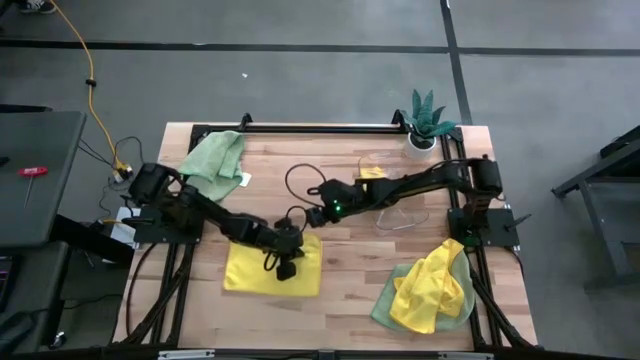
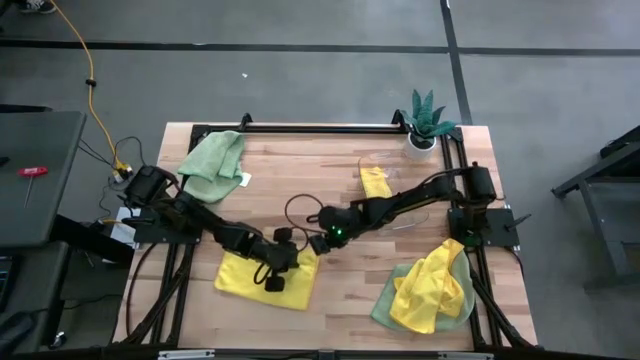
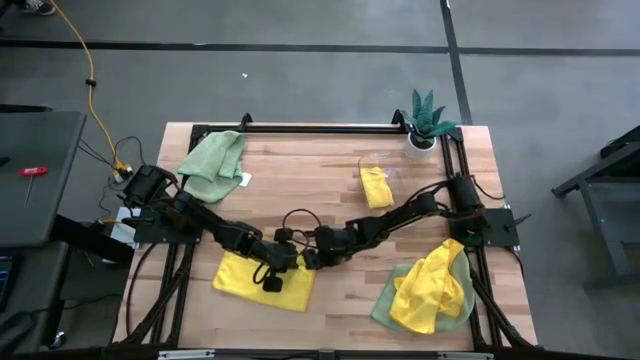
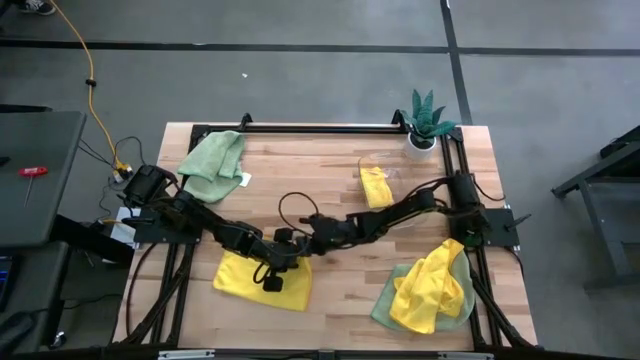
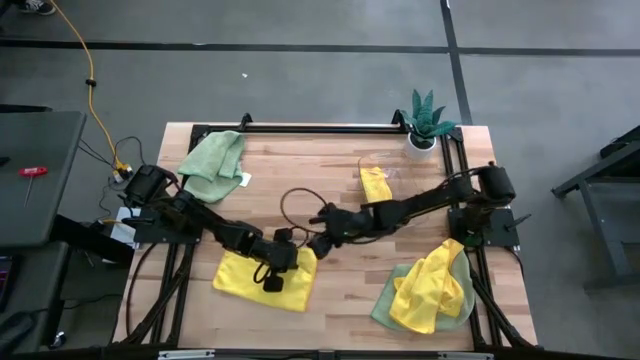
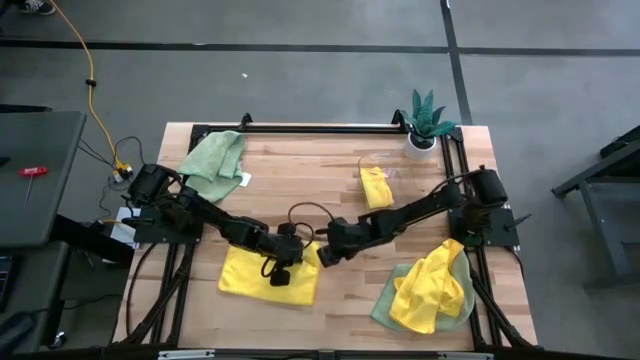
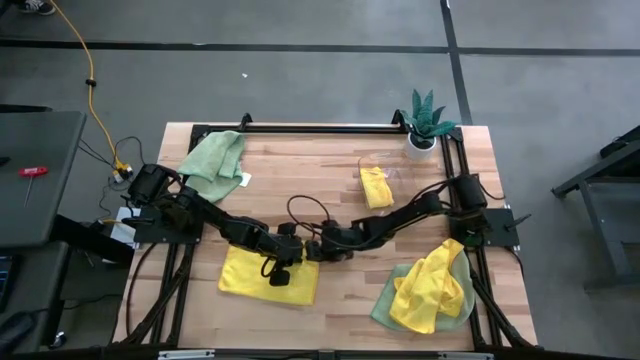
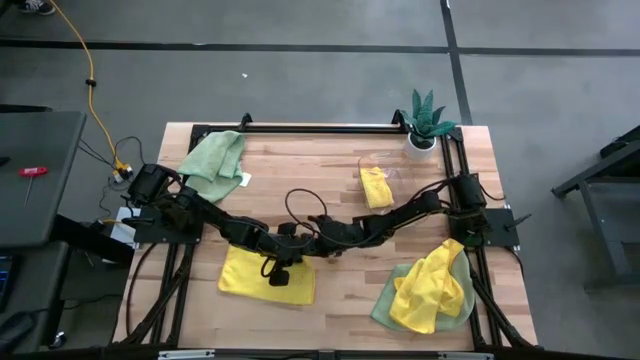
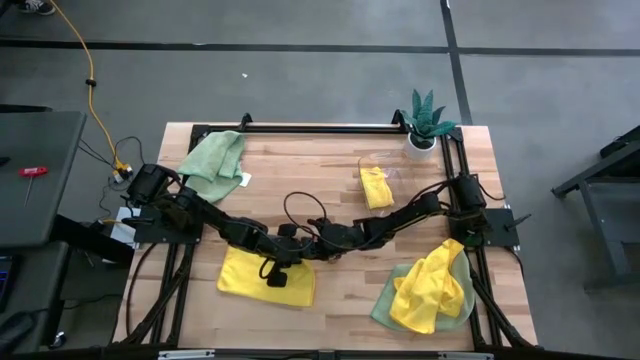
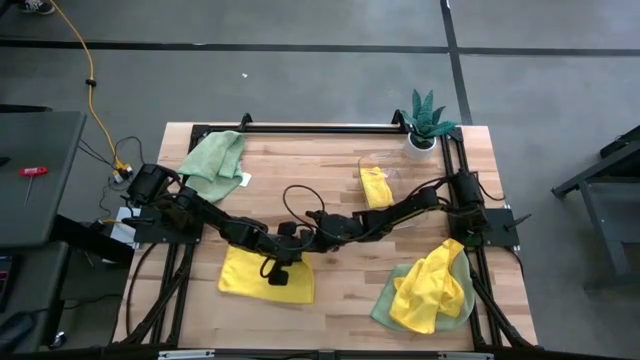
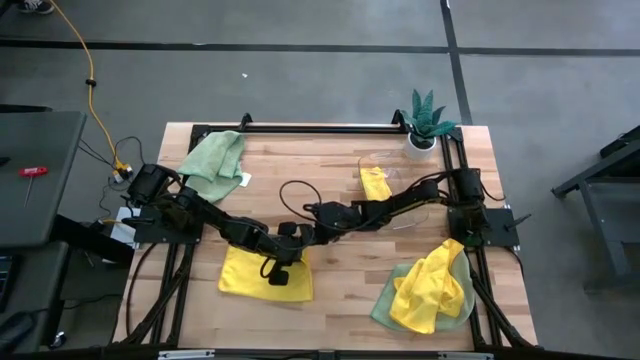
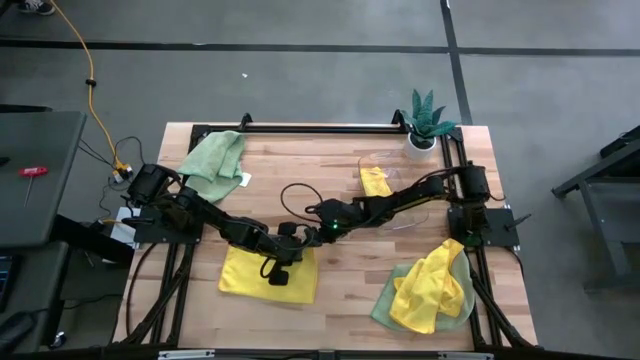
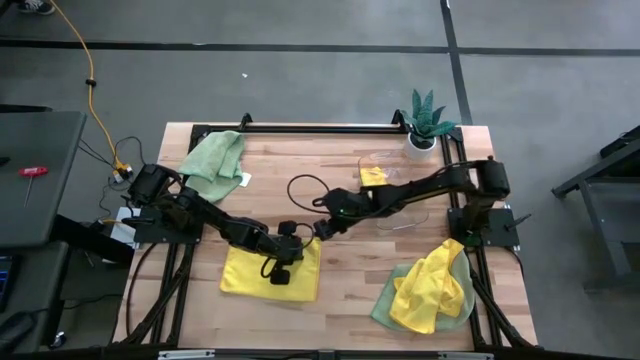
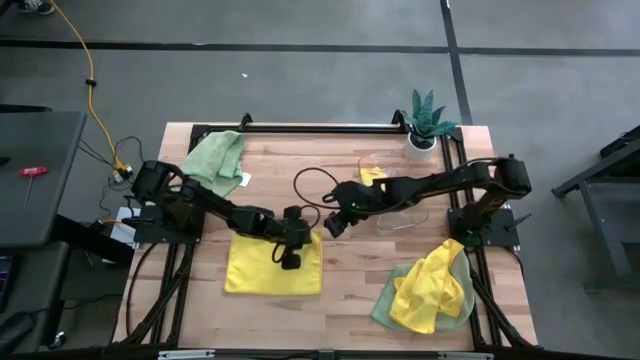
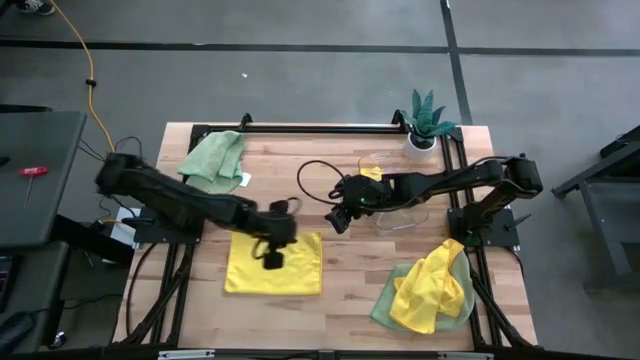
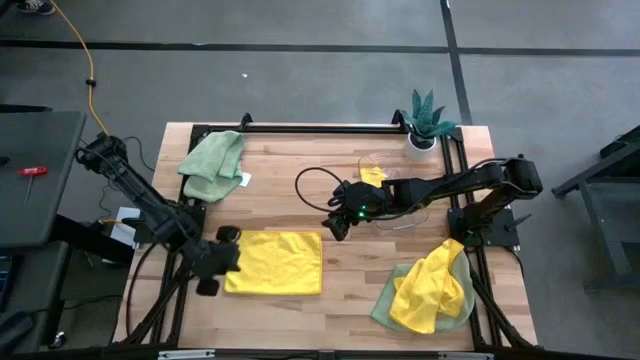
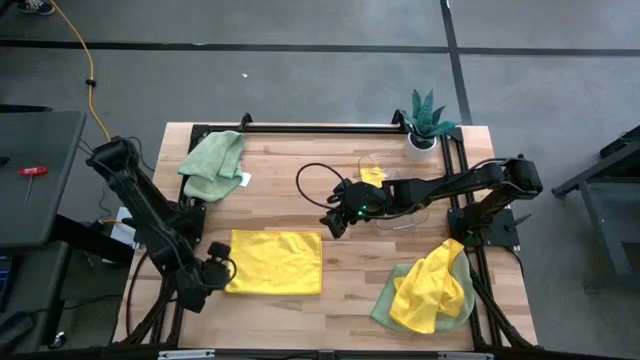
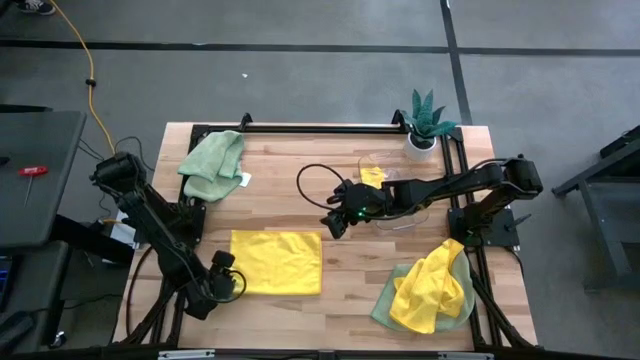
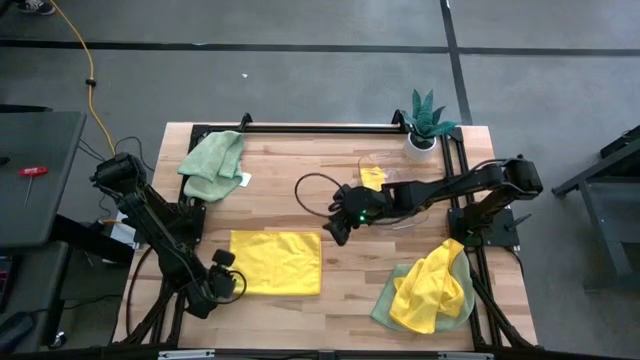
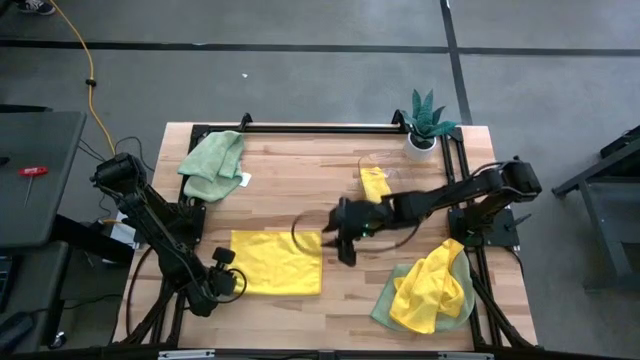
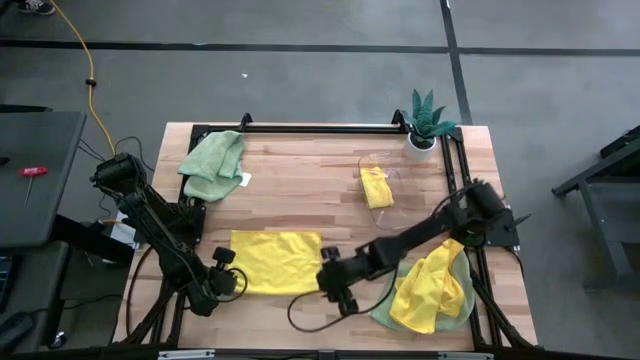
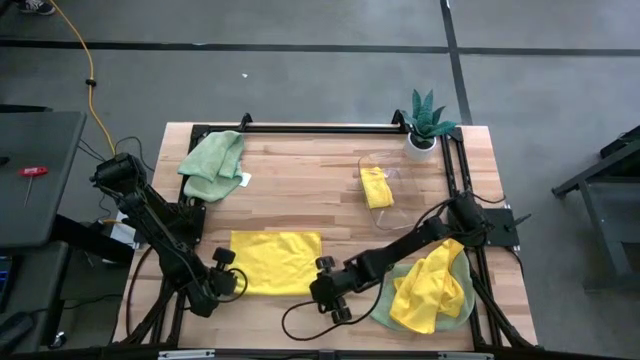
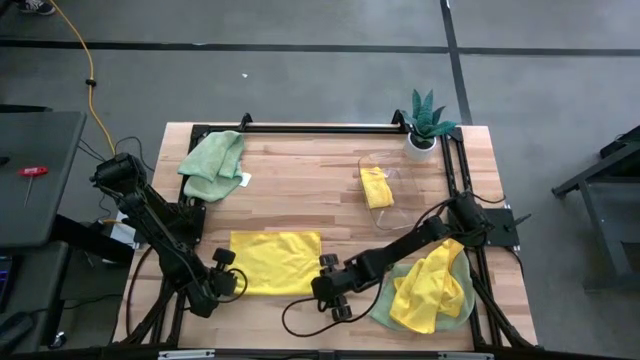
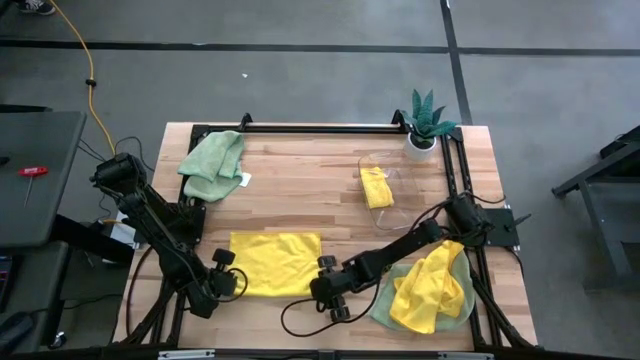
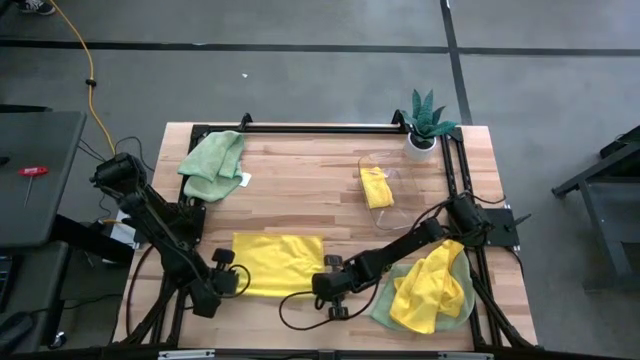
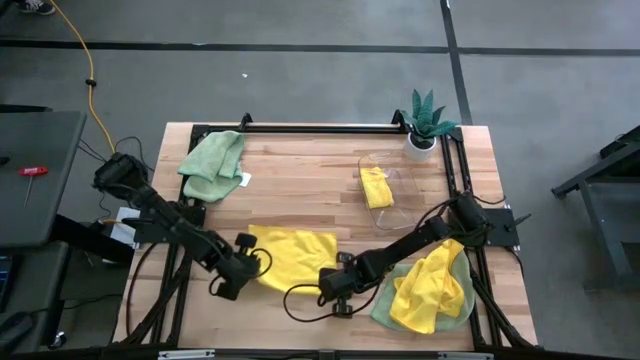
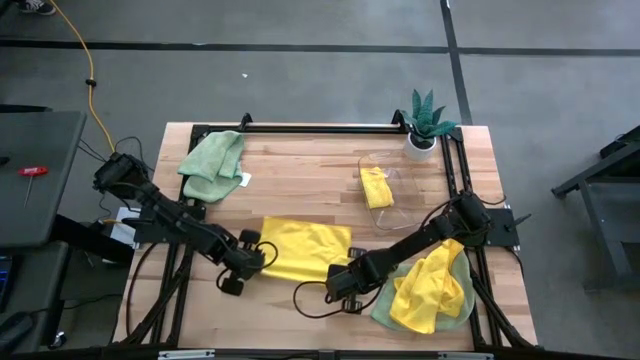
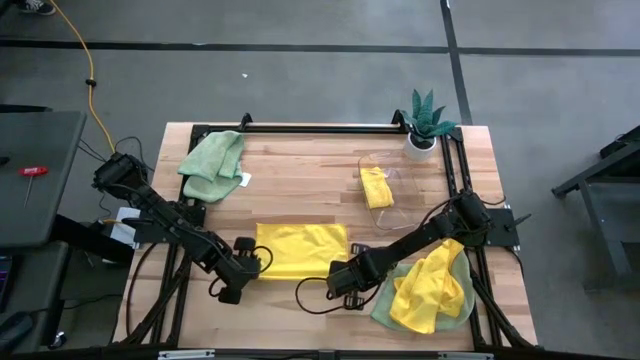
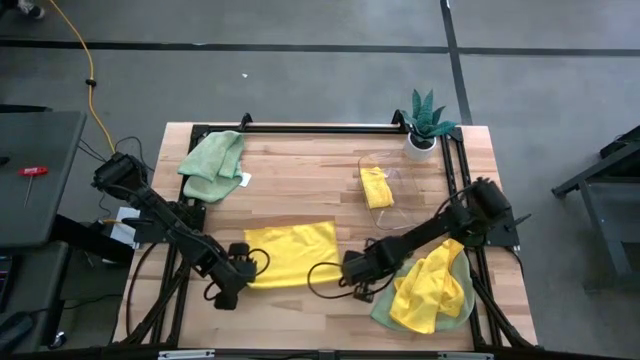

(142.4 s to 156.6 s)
Task: Fold microfiber towels
Fold the top yellow microfiber towel

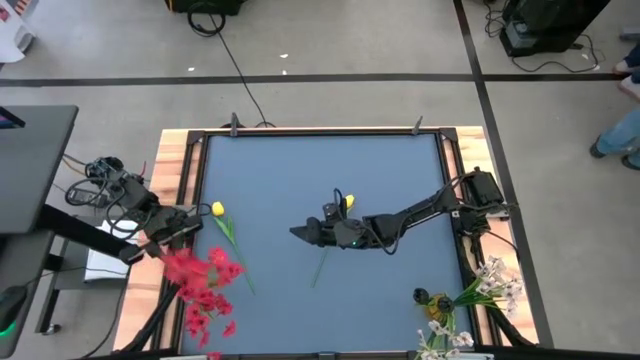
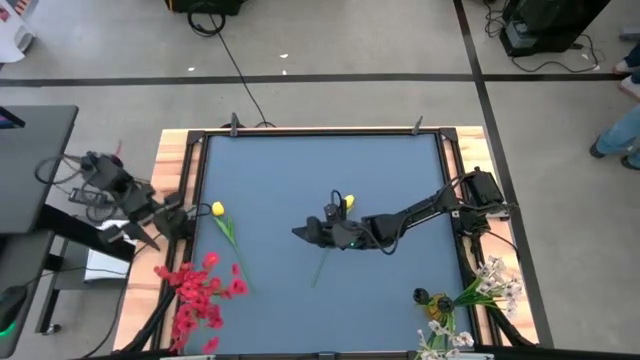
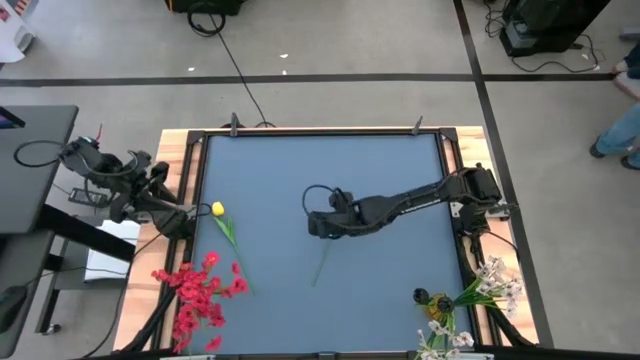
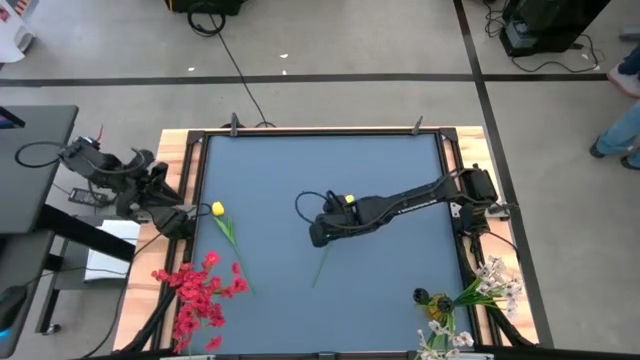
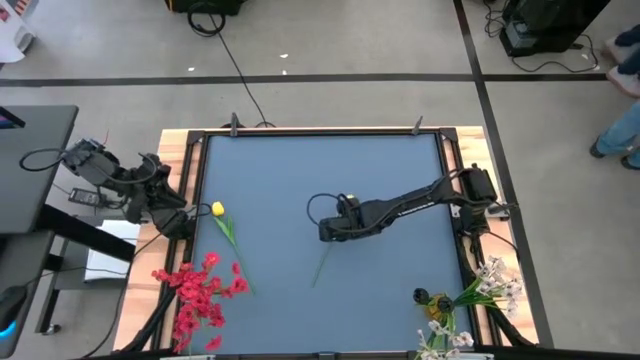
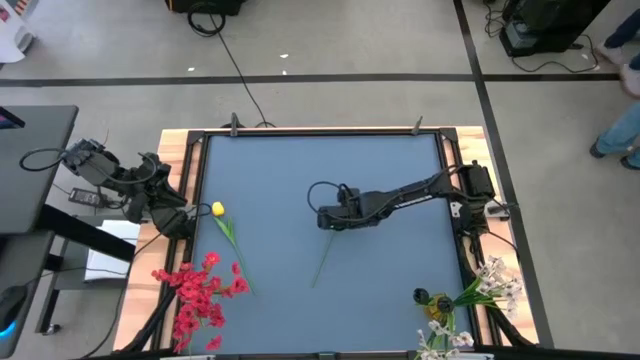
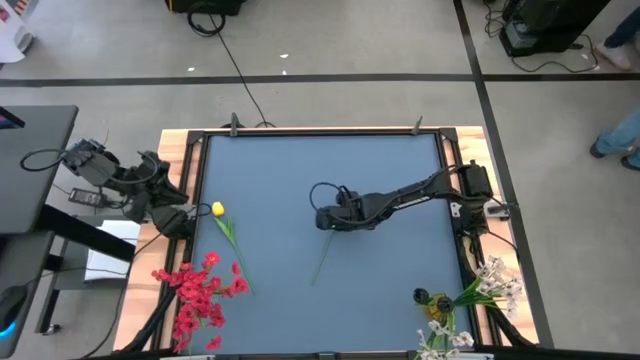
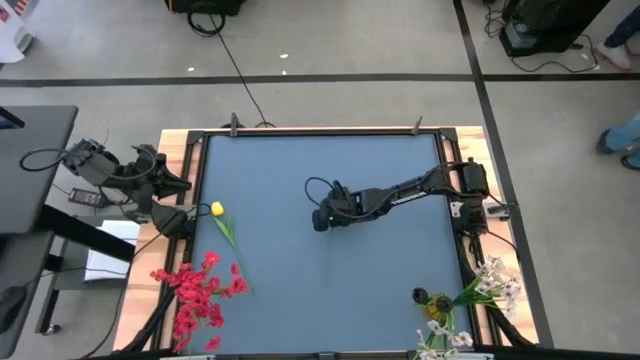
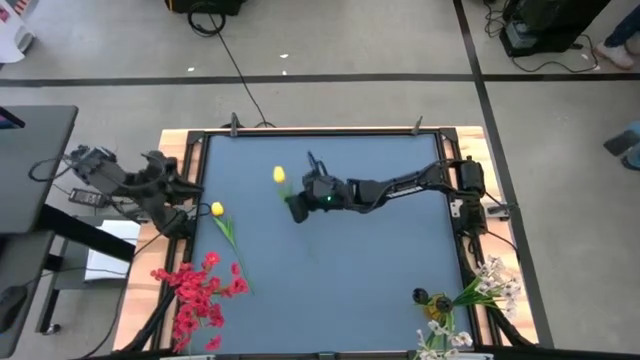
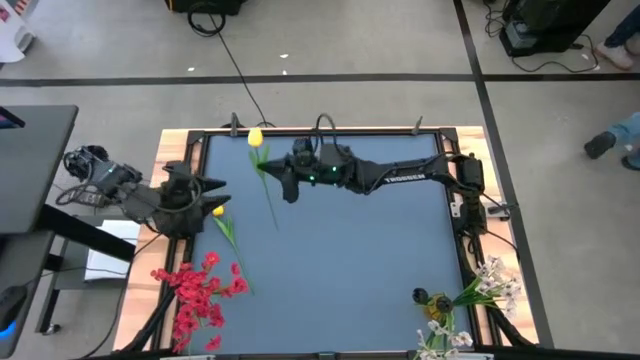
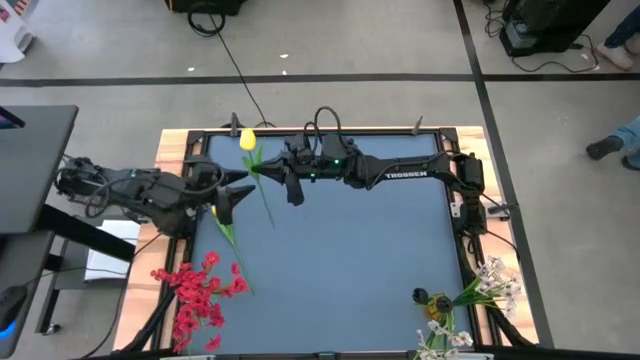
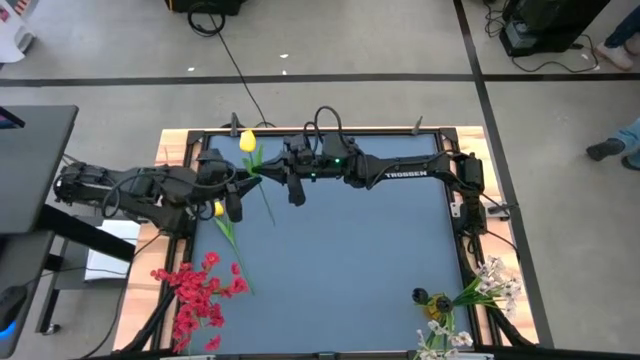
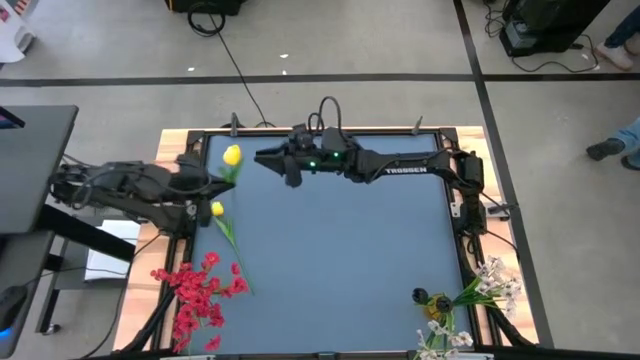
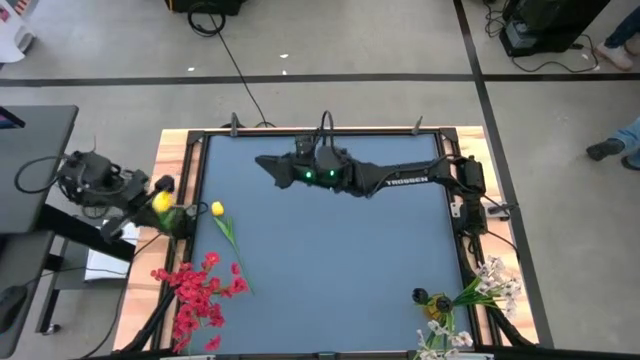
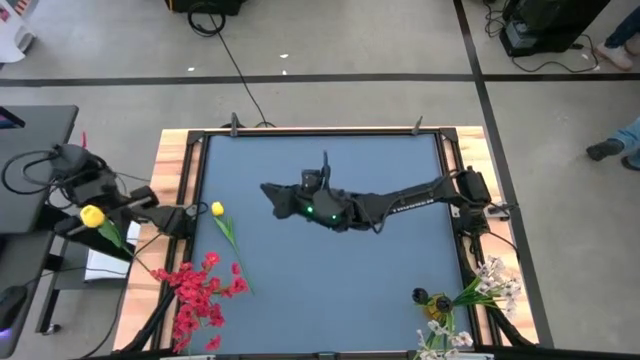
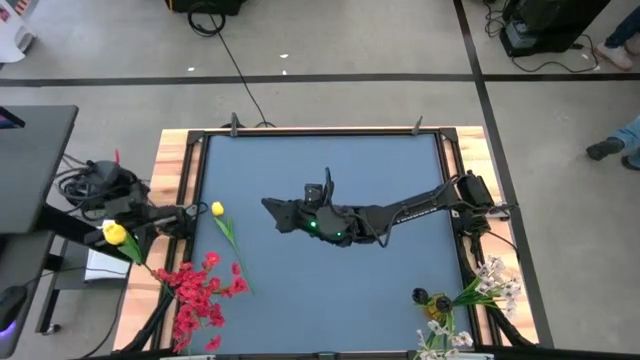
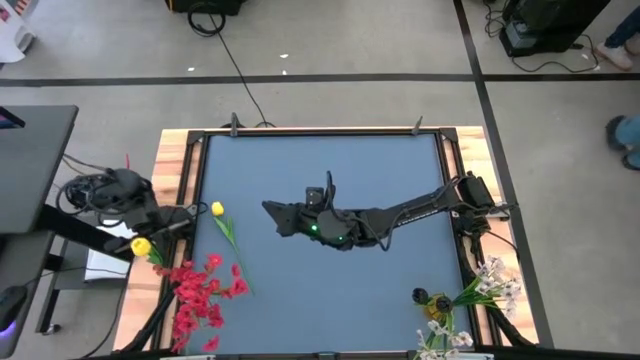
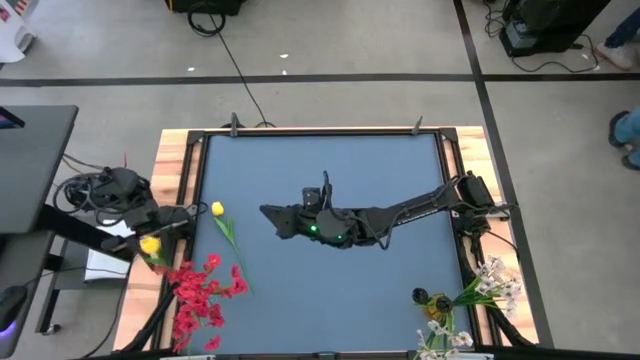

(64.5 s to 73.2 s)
Task: Sort flowers into vase by color
Put the right yellow flower into the transparent flower vase
